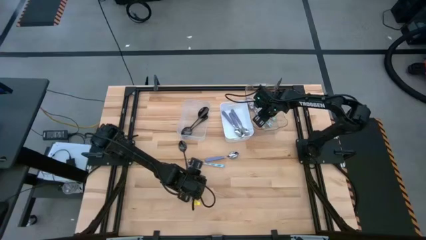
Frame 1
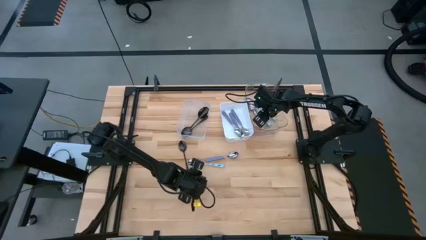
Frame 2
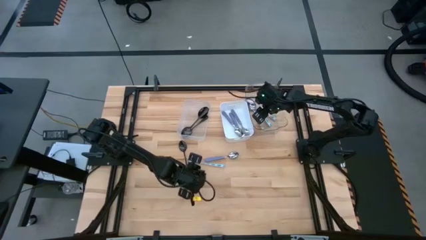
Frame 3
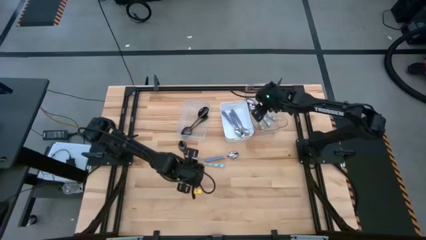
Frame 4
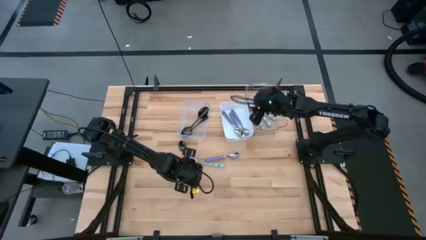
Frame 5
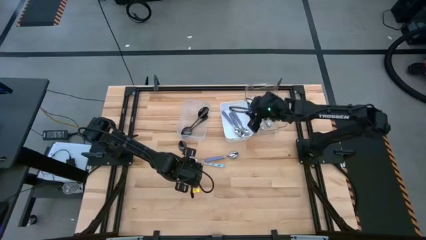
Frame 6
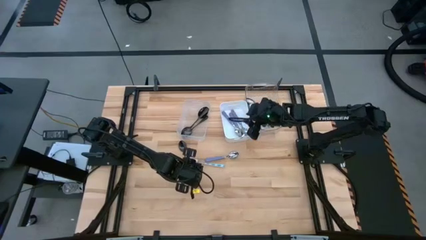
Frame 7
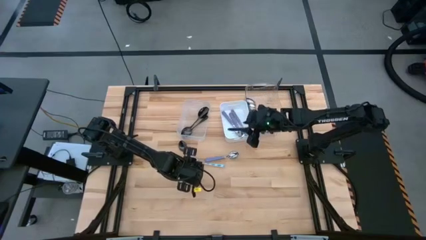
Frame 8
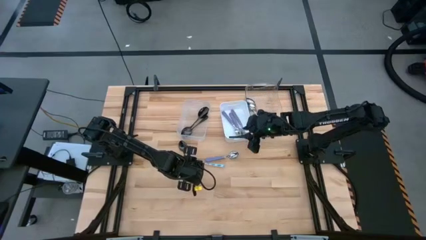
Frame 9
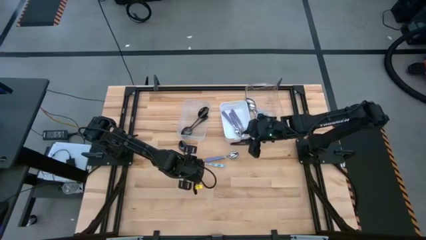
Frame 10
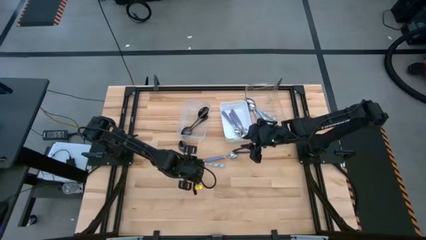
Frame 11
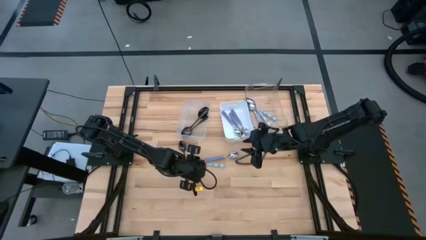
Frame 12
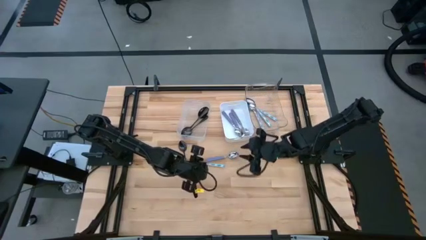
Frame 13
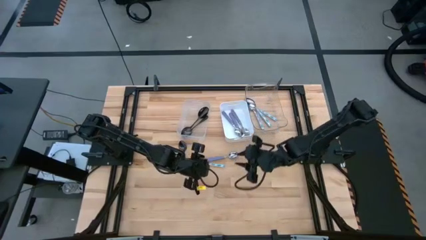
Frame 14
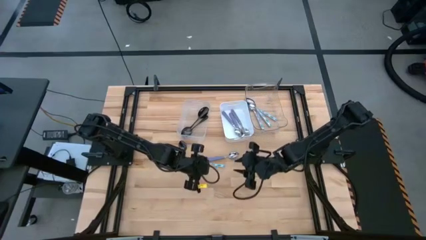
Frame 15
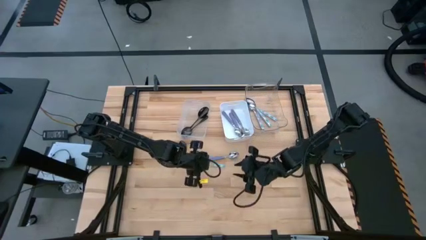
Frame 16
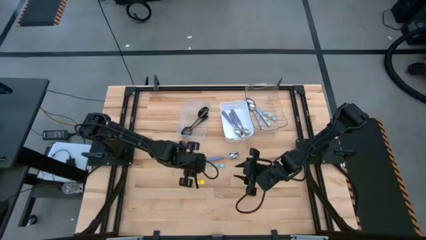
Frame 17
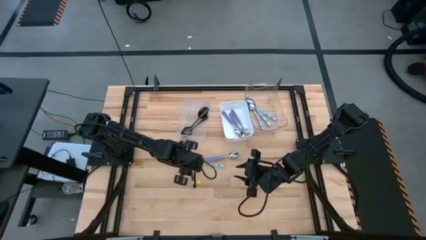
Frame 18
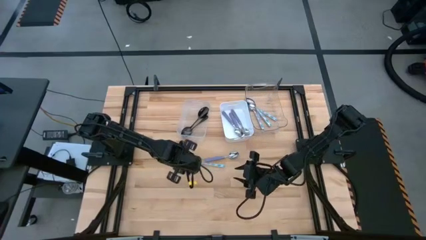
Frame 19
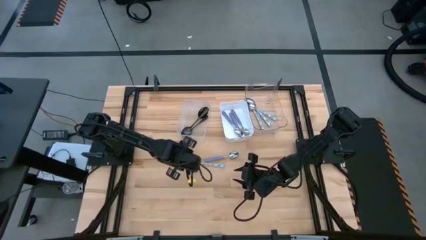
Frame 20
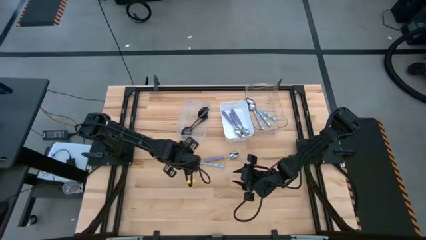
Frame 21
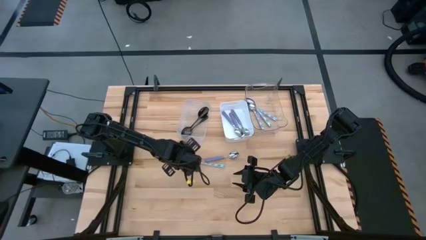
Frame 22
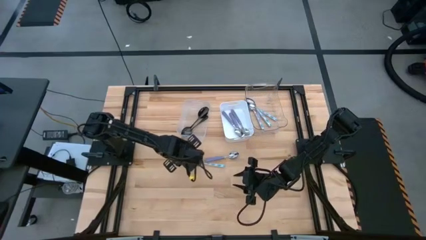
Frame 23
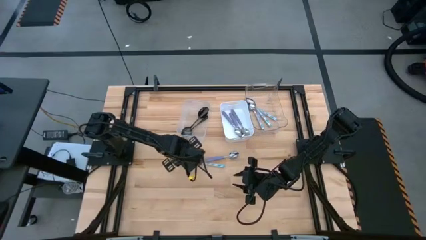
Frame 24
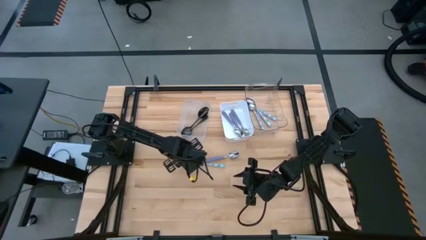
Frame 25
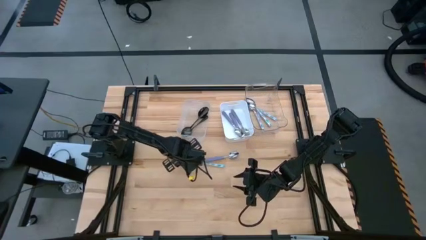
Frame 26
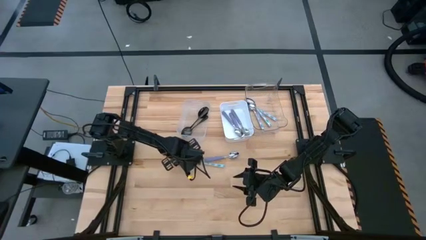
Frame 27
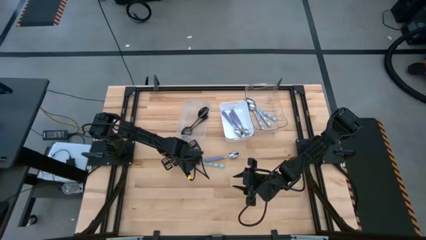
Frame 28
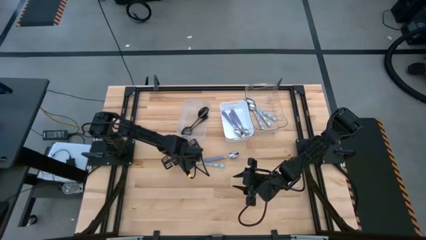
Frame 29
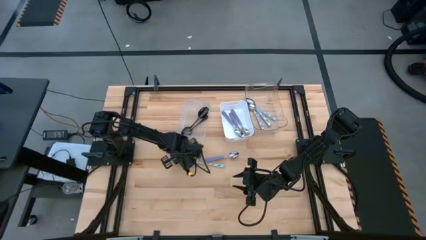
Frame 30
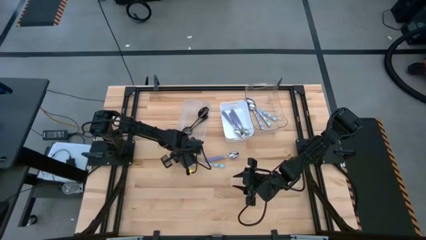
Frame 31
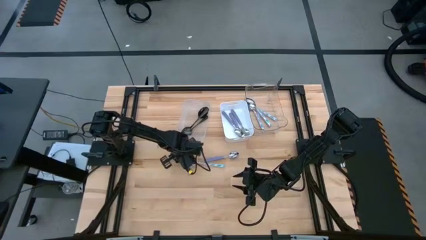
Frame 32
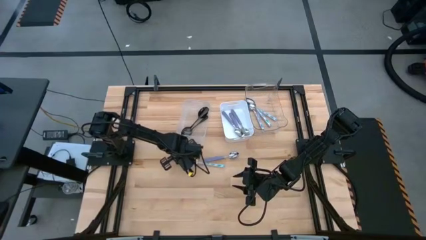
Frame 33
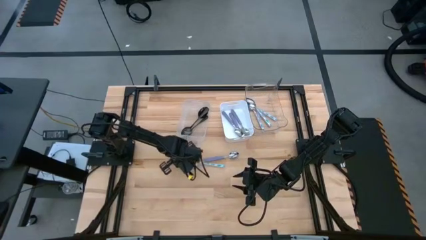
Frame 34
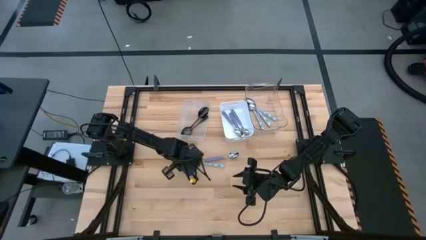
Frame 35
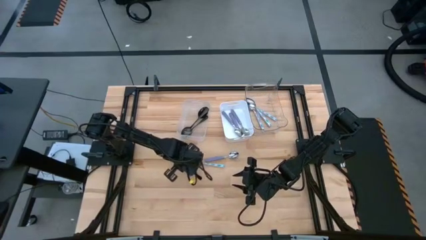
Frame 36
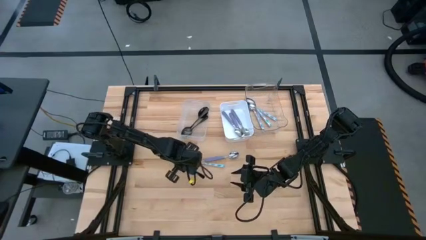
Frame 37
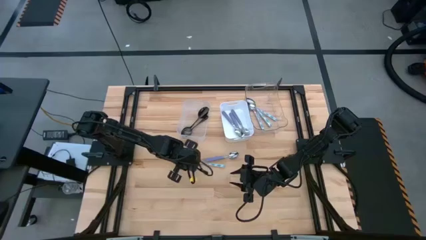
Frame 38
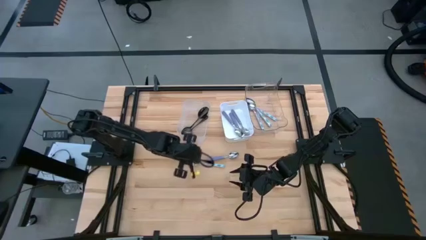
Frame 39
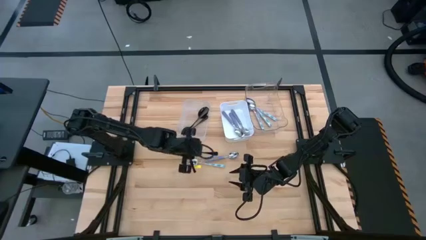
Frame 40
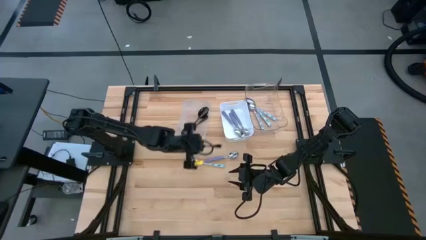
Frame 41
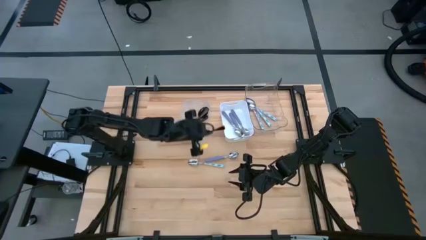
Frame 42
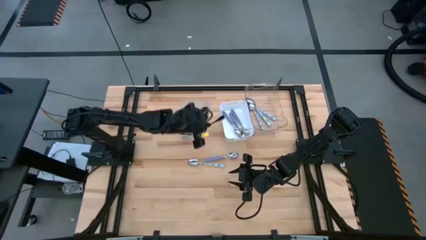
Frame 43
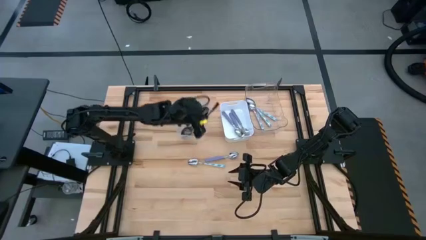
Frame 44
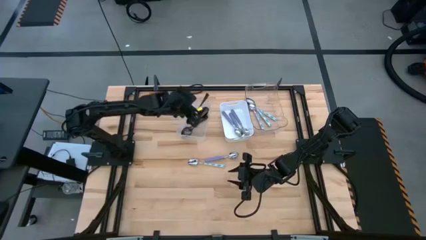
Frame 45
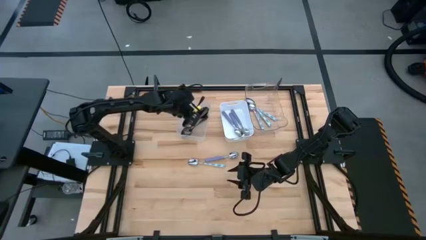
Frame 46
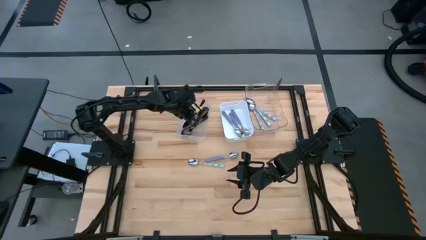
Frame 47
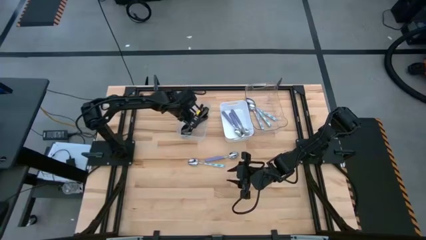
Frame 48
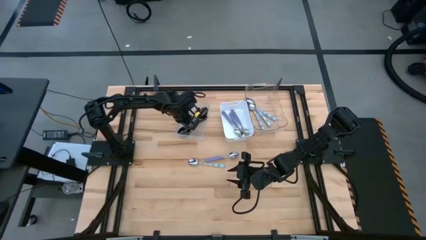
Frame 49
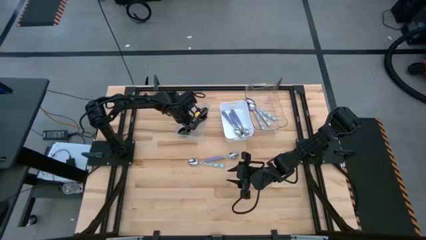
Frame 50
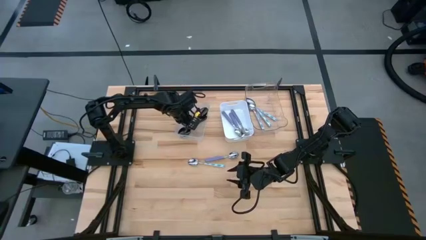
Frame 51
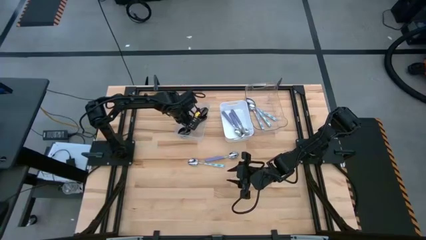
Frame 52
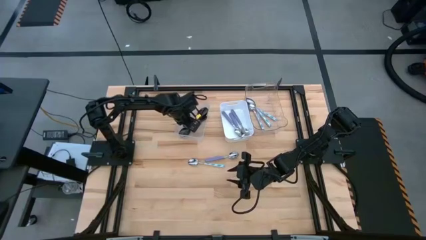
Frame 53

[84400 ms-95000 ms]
Task: Sort silverware by color (type)
Put the spoon into the left transparent bin

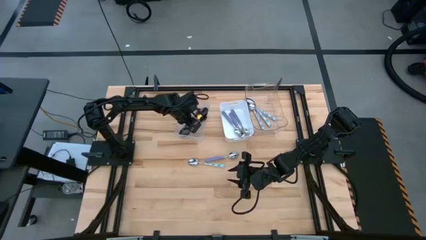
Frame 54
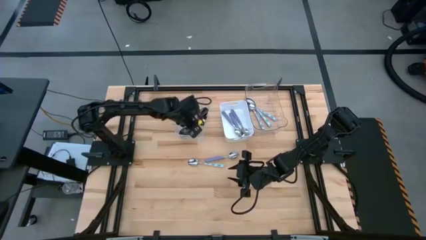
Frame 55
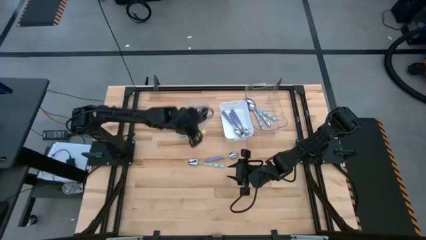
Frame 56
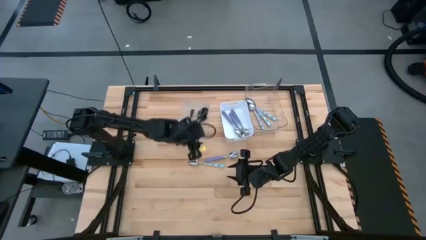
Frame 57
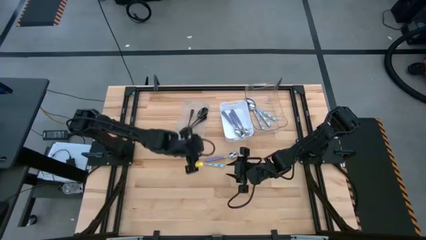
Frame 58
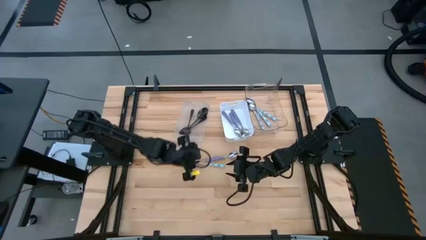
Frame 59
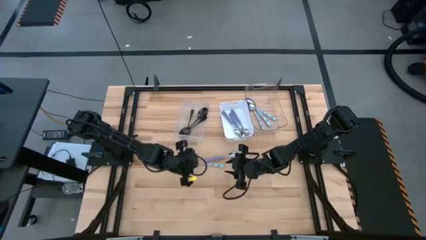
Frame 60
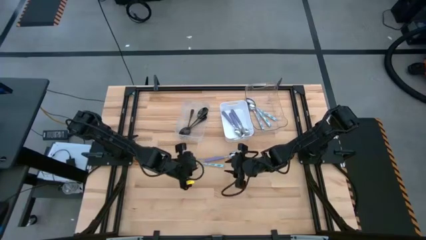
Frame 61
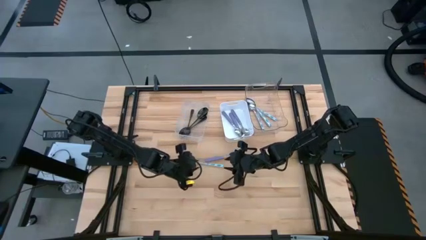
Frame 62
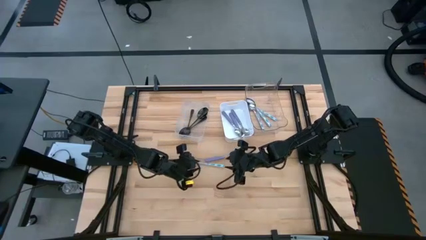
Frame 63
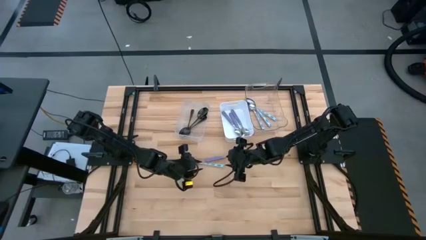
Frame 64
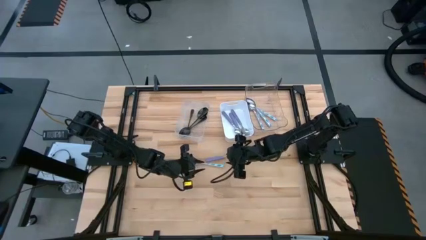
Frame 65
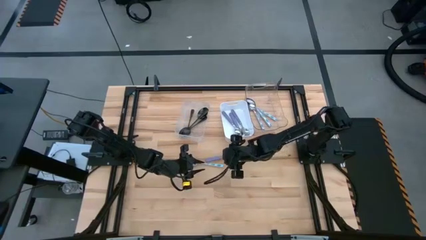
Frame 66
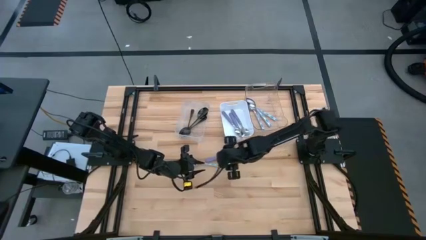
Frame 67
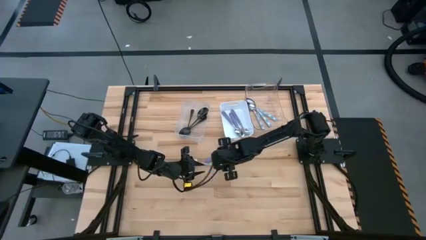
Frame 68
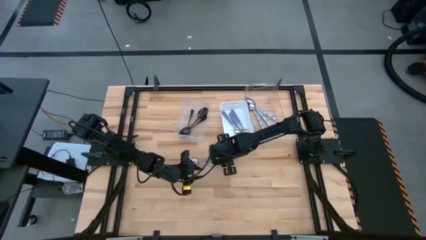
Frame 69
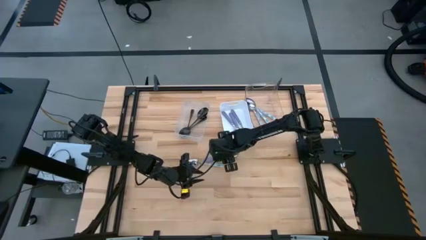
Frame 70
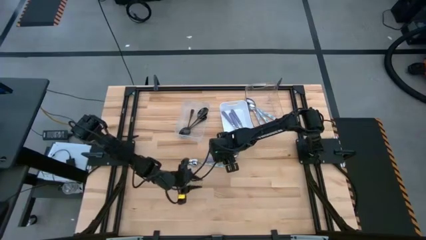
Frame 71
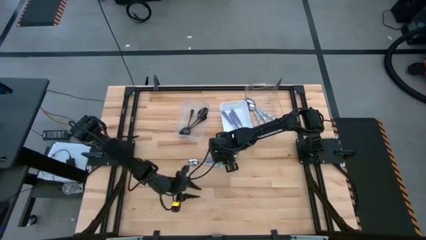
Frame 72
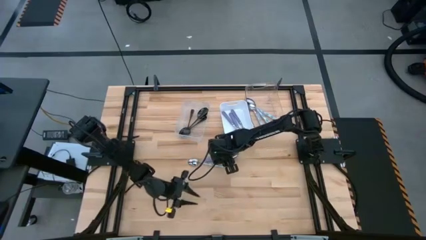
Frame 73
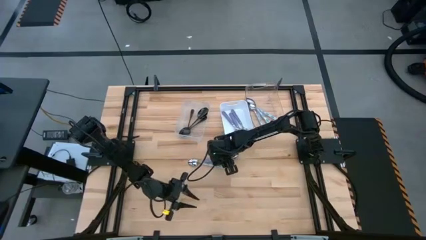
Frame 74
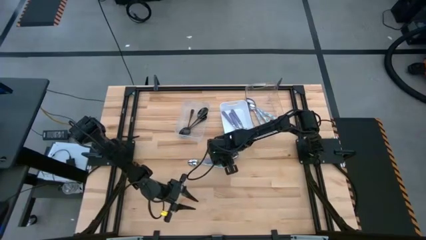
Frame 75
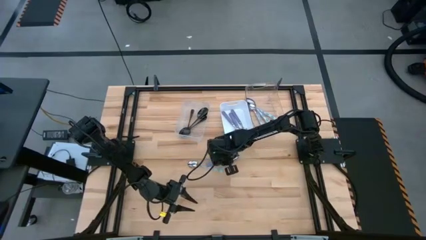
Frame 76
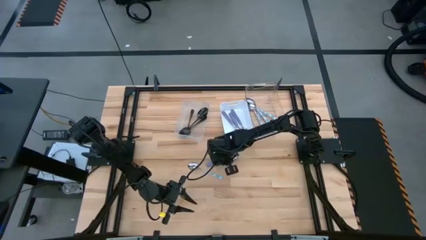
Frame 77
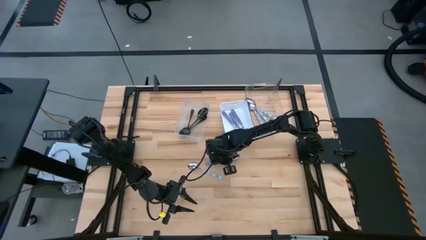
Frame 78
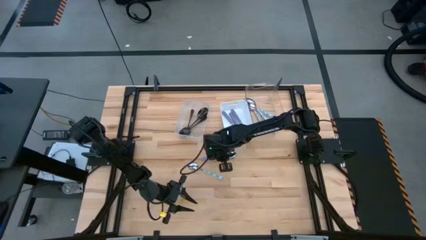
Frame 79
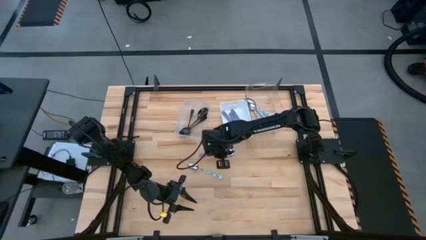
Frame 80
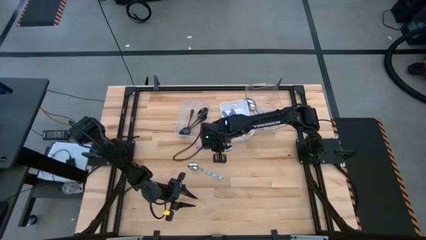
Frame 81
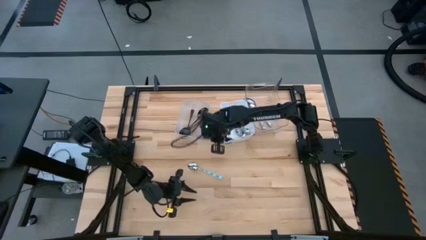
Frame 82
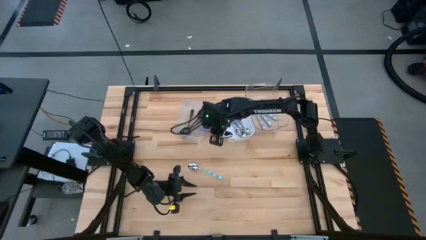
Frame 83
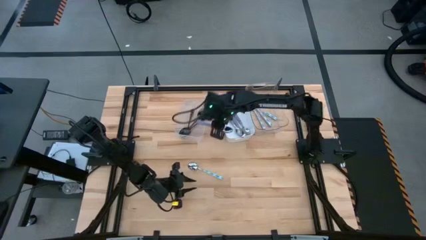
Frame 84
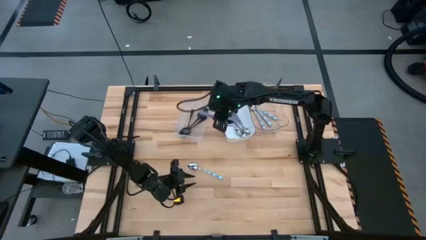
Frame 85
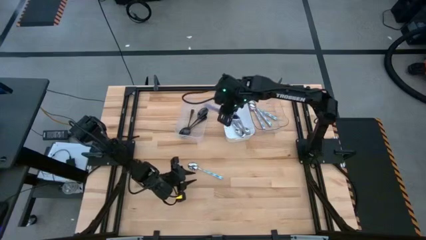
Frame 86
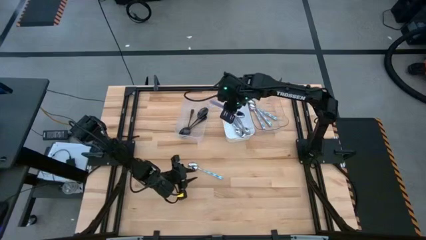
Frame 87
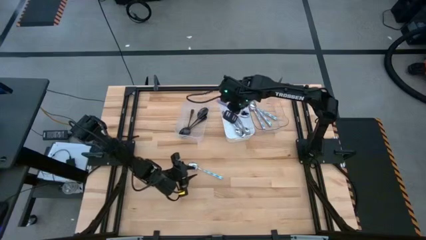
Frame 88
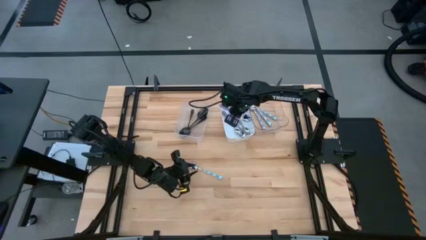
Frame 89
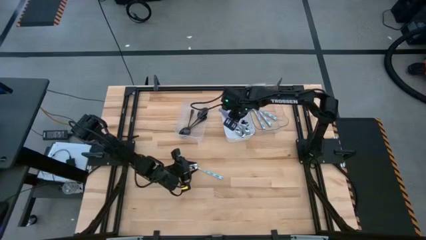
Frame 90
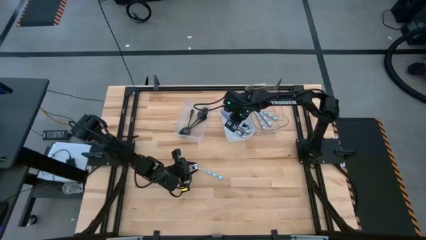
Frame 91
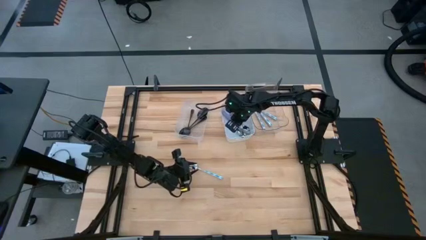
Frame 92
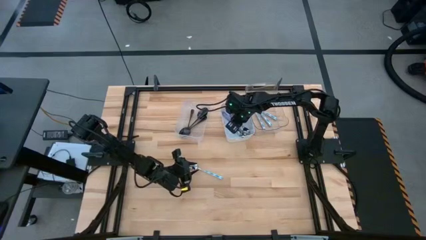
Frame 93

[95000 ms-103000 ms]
Put the violet spoon into the white bin
